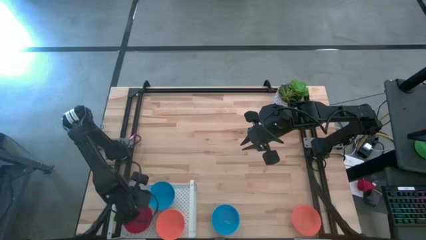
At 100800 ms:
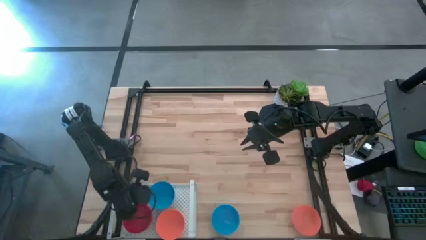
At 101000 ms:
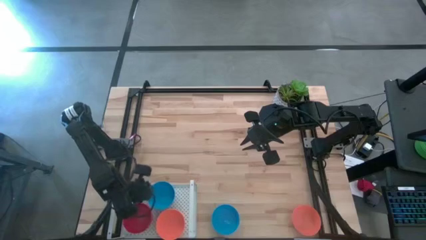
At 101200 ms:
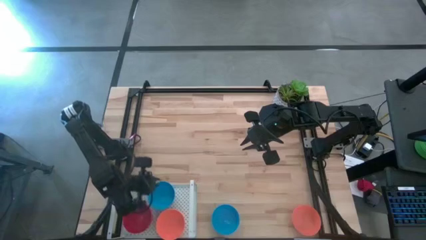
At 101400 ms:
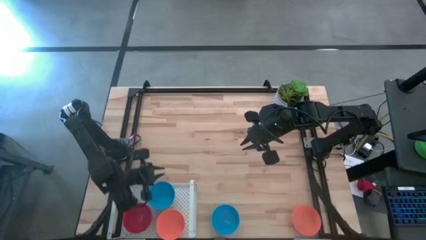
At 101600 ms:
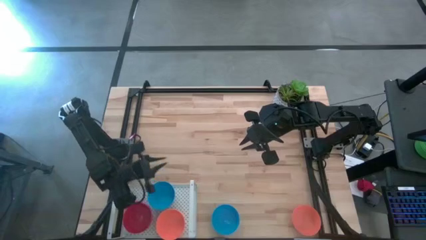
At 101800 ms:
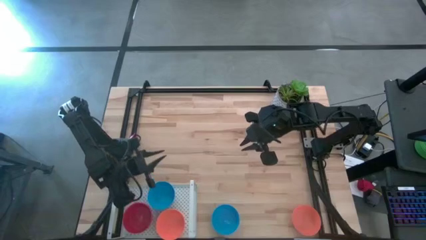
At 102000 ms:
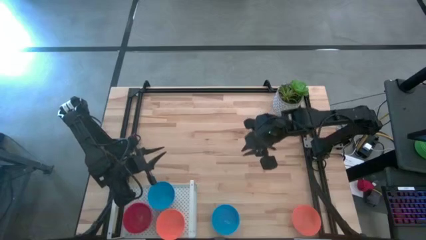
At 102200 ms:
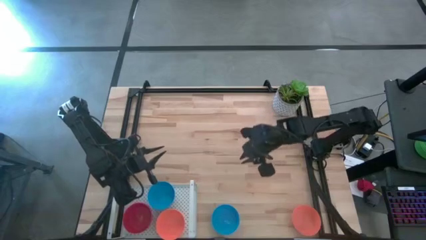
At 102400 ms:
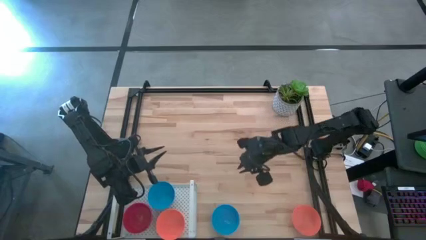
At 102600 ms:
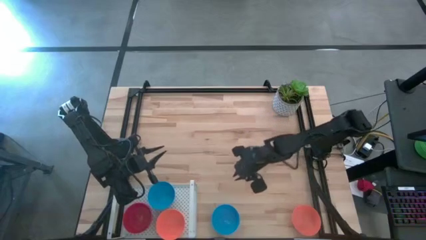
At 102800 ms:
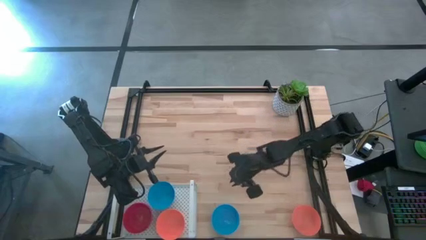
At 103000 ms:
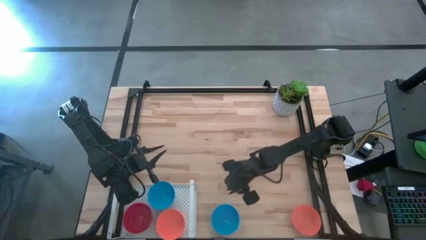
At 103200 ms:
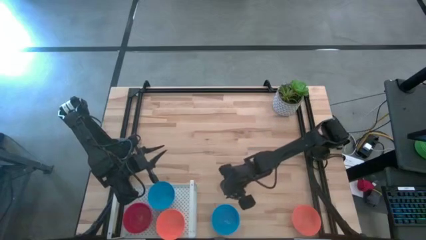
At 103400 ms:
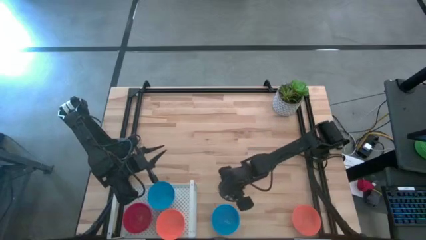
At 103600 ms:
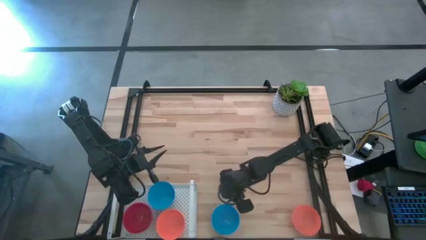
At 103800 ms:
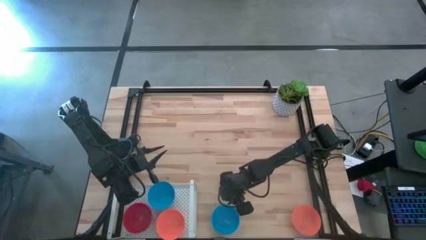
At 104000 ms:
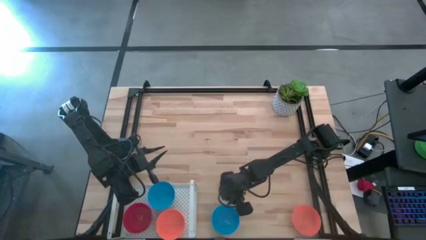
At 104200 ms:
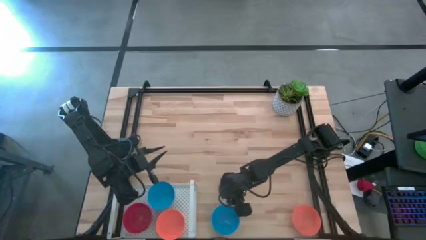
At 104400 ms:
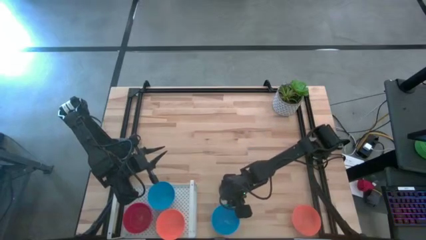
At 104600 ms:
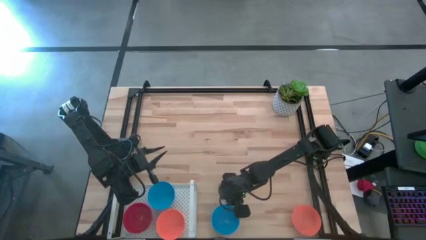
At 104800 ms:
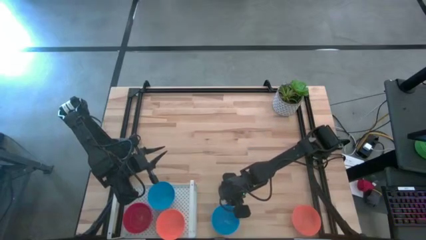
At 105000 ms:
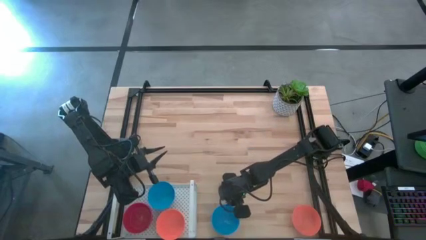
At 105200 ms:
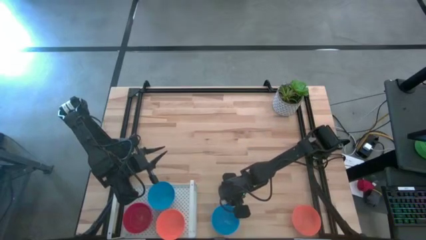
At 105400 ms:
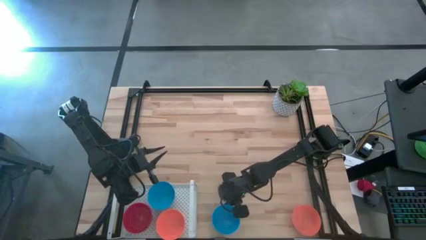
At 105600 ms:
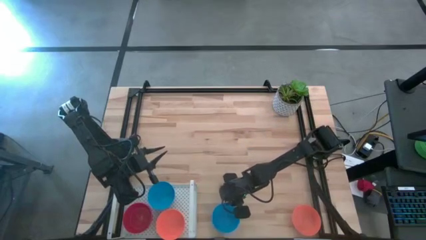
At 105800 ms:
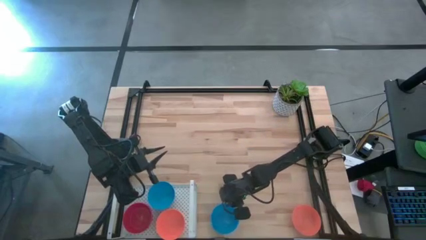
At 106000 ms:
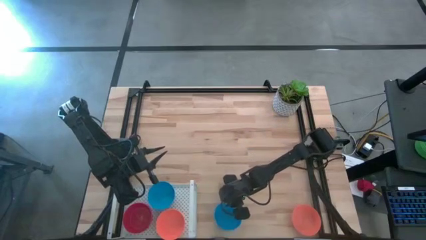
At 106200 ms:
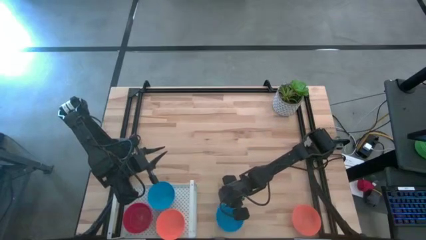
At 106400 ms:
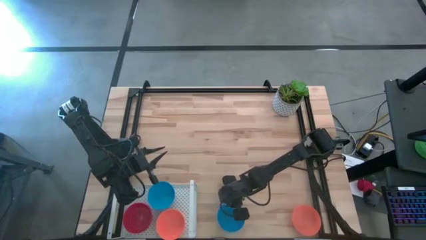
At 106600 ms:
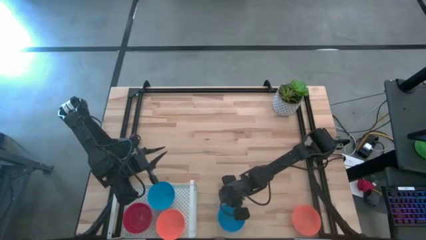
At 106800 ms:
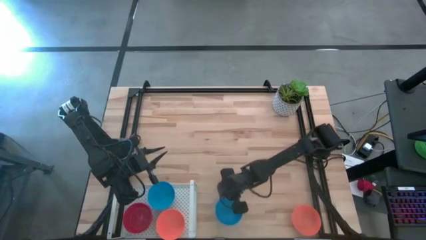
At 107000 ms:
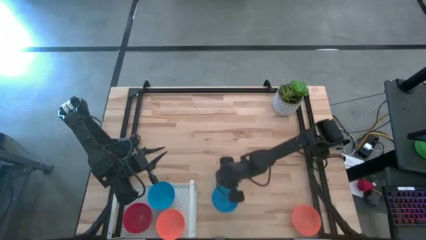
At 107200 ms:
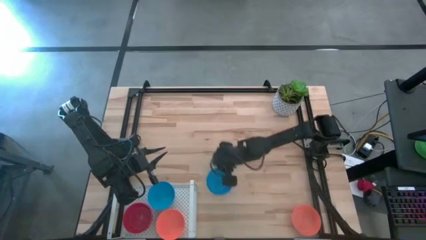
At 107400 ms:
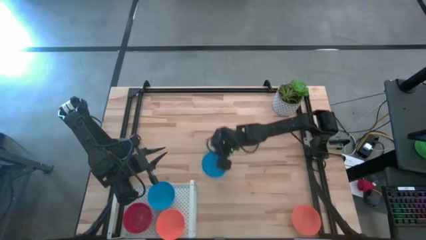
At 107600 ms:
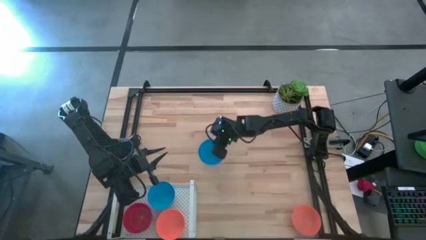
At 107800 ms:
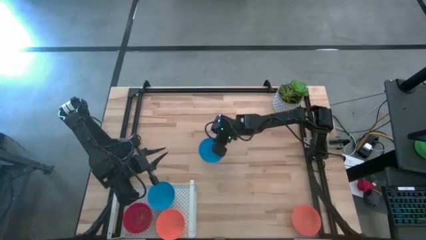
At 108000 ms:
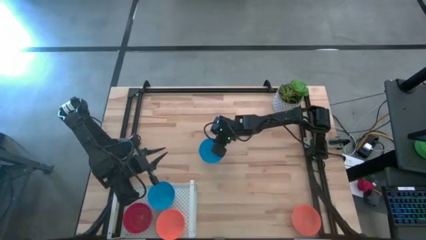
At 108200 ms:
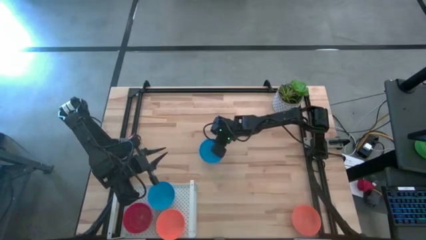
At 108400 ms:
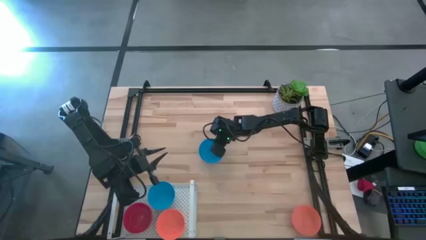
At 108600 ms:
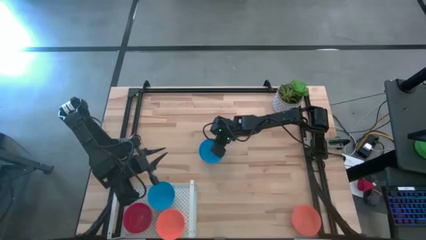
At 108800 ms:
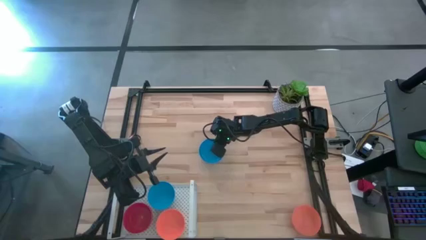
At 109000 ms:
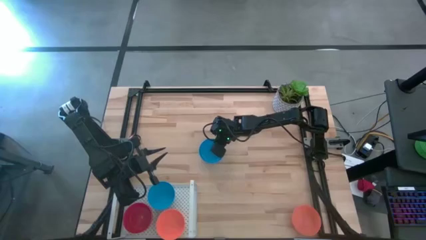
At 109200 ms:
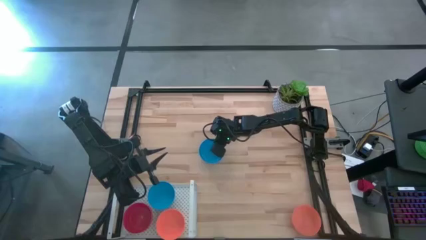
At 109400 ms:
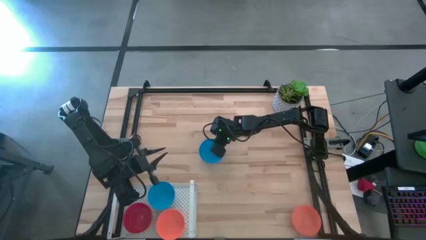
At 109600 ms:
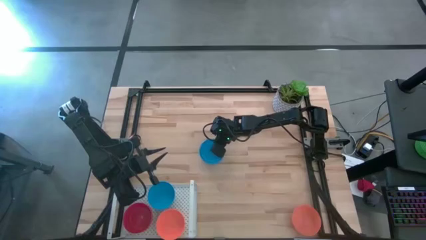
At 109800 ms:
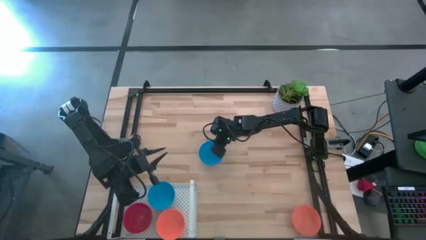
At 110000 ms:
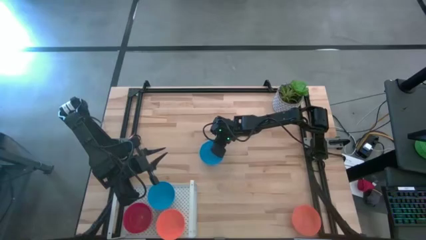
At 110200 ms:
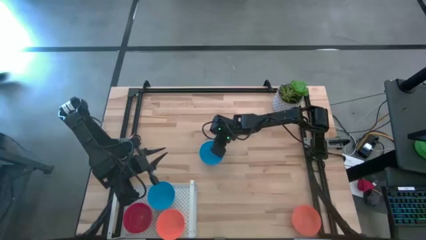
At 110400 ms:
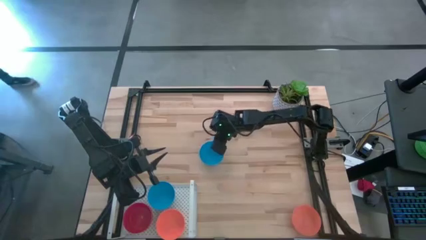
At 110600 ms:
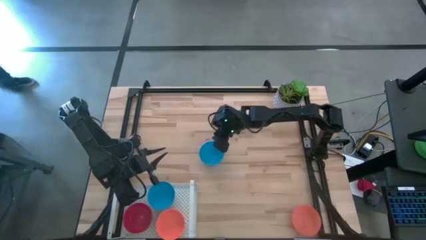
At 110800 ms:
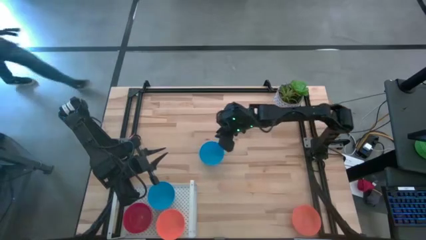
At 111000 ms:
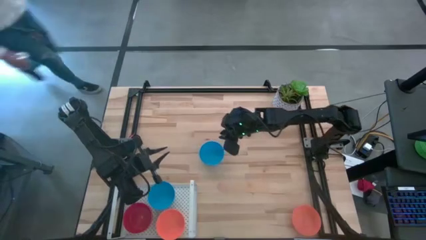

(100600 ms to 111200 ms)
Task: Pick & Place Mini bowls
Stack the blue bowl on top of the blue bowl on the shelf

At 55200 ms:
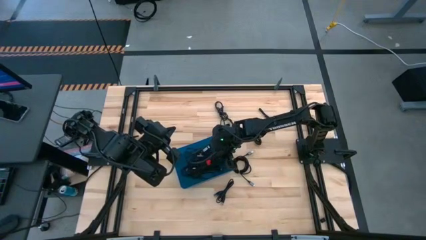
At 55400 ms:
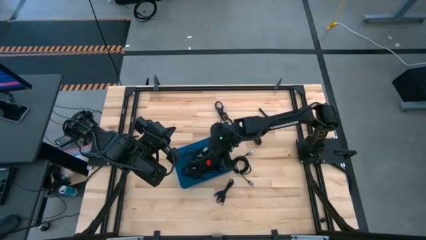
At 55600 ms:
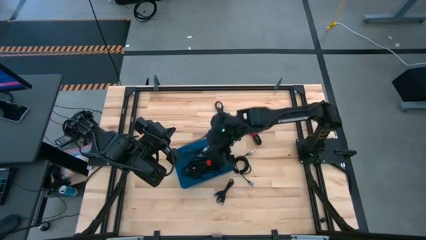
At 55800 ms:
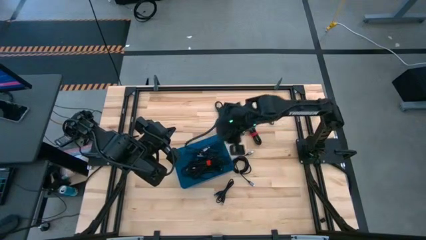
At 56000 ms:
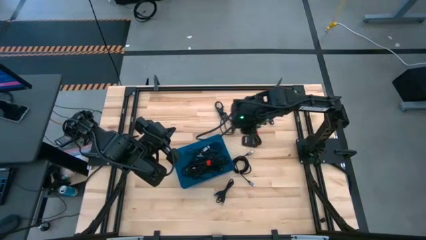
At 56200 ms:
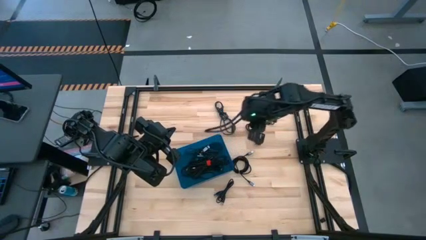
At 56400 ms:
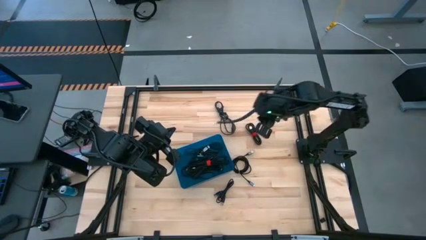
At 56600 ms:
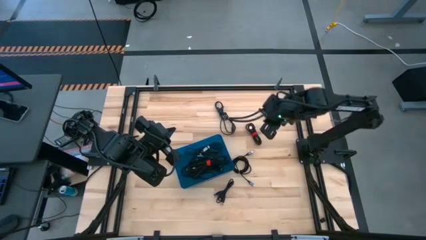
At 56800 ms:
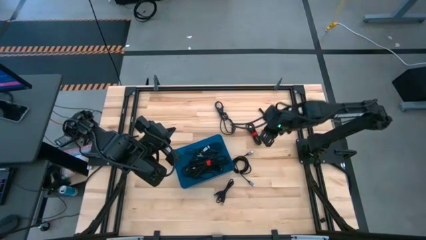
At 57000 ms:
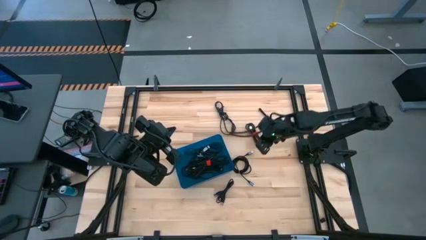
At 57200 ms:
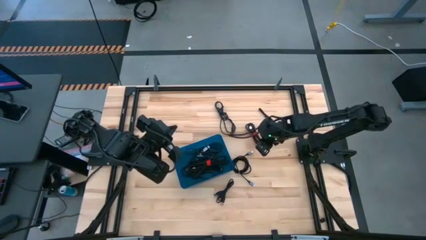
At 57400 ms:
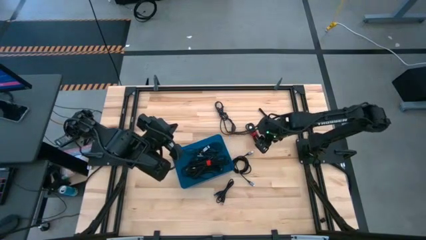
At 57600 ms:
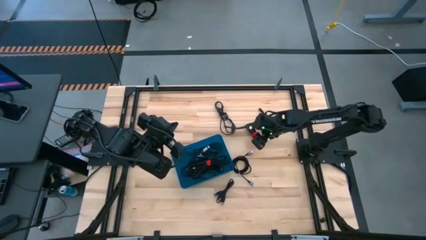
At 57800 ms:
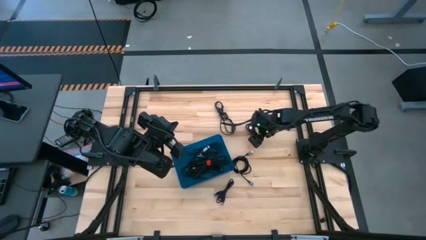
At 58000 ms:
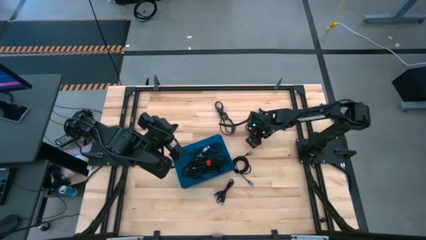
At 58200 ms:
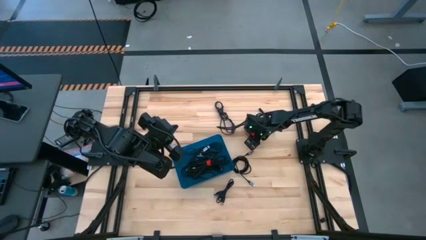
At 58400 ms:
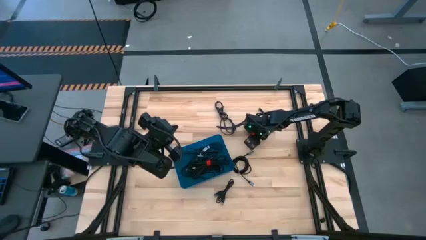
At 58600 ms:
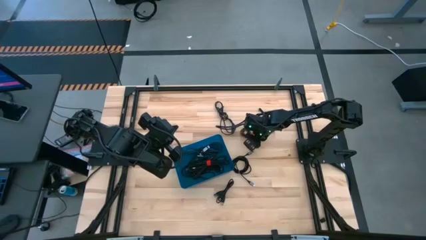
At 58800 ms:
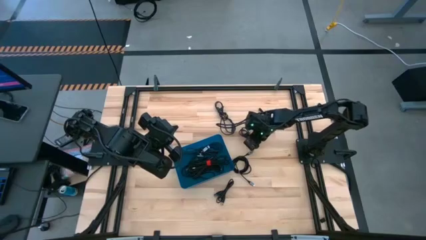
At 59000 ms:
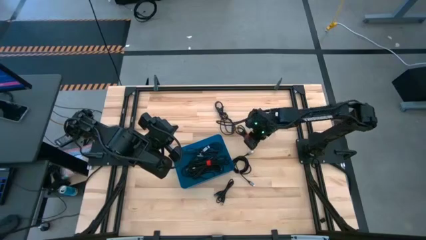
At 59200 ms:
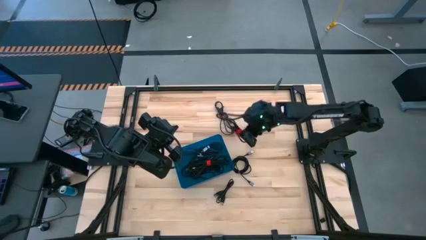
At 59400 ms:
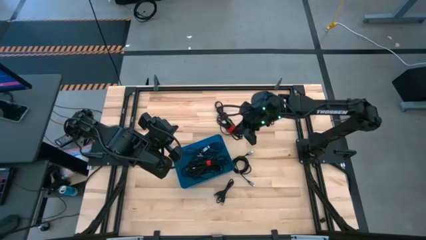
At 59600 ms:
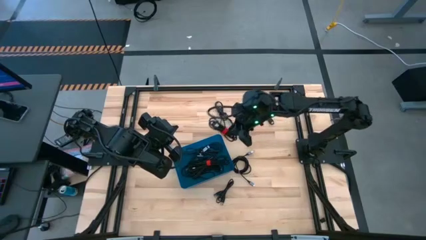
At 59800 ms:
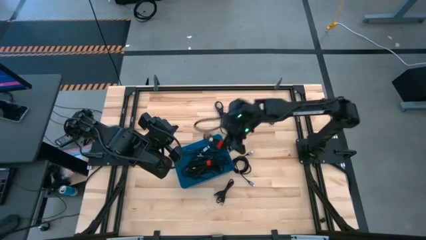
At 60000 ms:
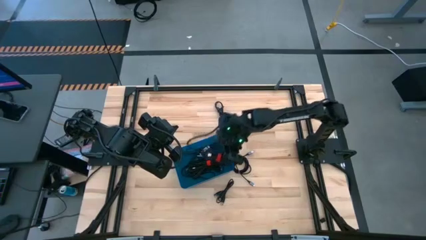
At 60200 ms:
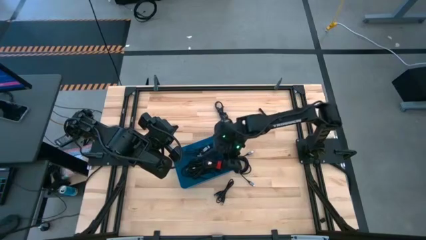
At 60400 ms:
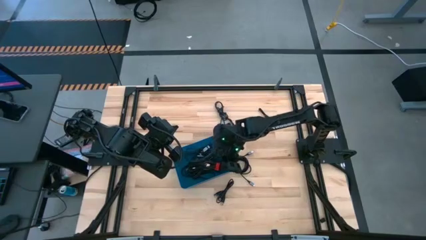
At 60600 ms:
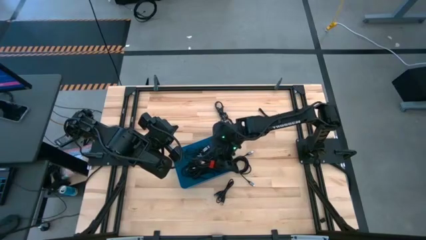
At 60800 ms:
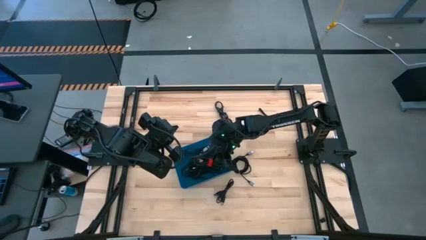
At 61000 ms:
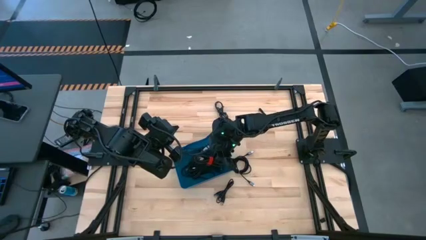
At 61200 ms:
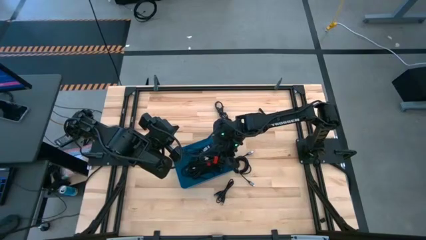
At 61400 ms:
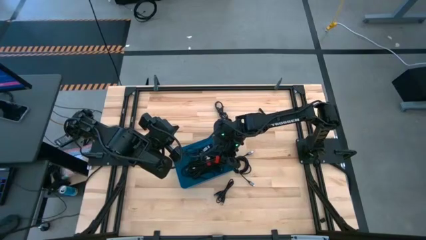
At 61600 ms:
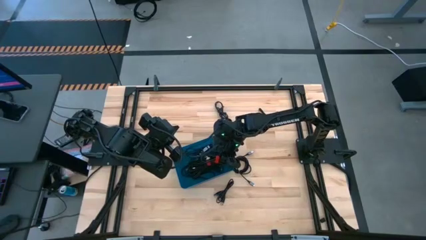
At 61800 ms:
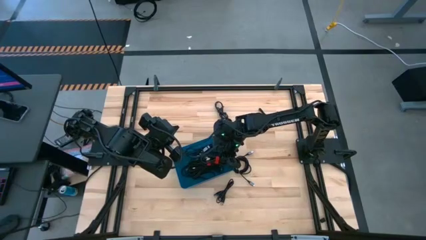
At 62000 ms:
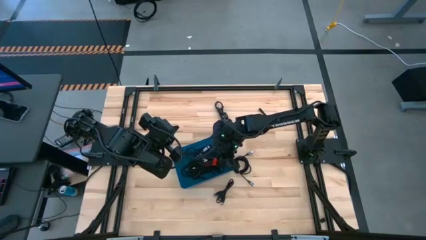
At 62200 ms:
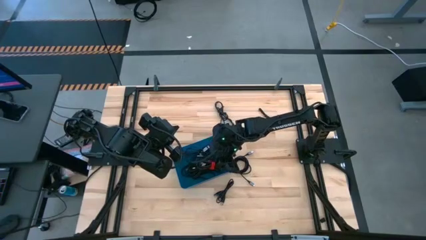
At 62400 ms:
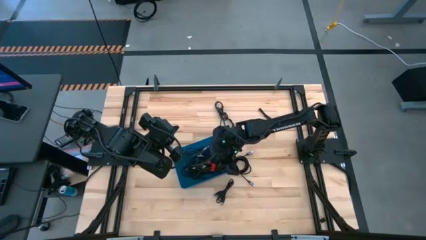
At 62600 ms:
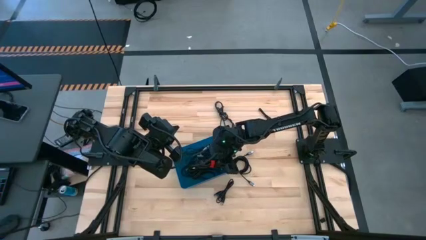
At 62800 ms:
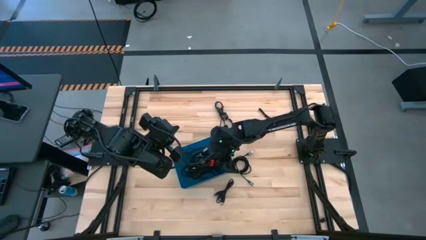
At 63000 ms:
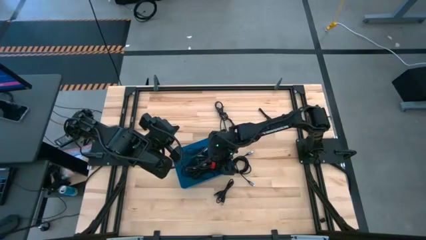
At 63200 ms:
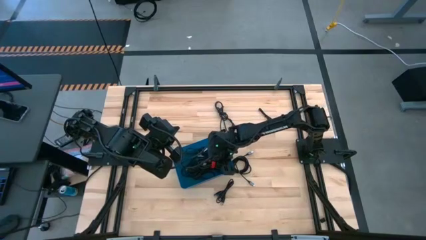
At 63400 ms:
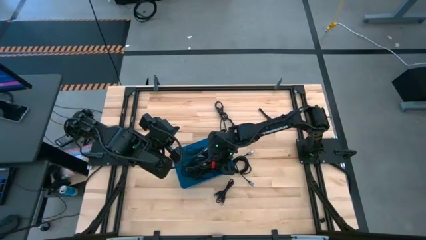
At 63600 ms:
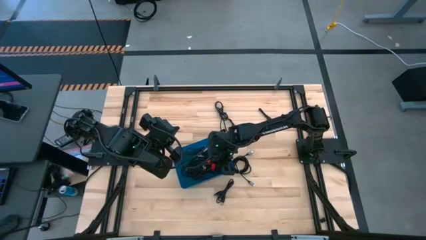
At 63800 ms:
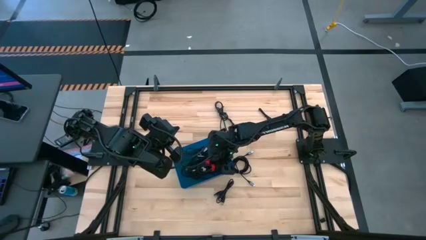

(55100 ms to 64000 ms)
Task: Pick and place USB-C Cables
Put the black charger cable into the blue bin
